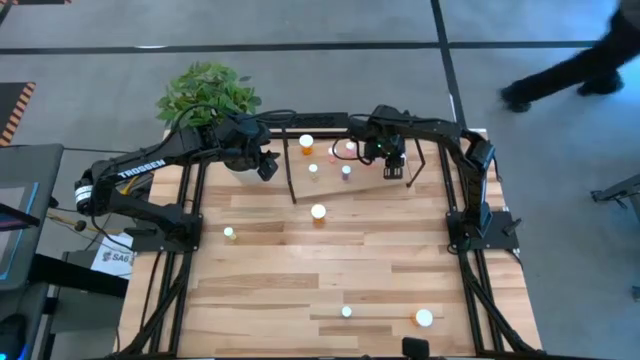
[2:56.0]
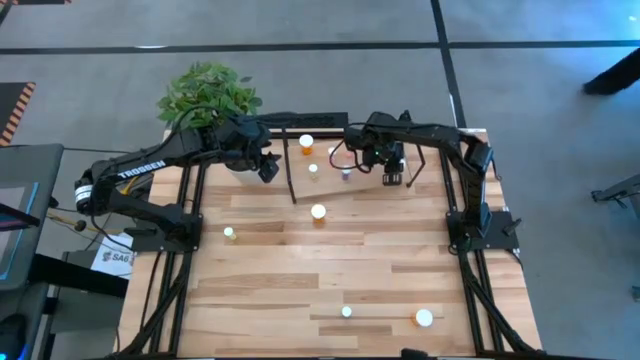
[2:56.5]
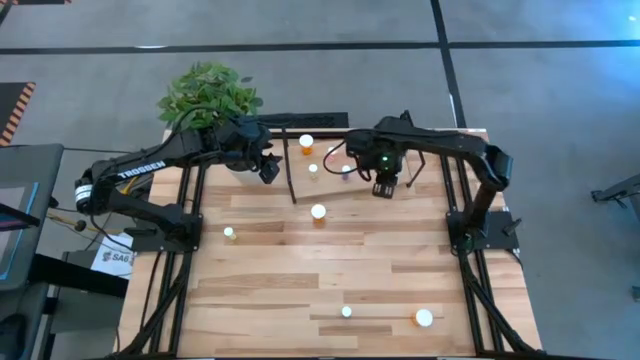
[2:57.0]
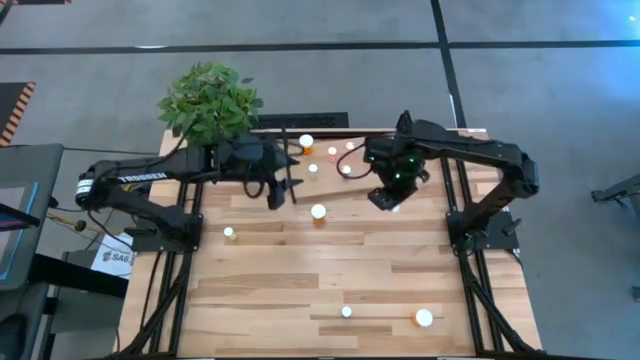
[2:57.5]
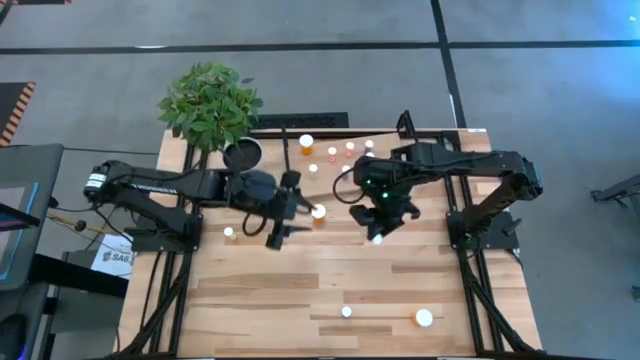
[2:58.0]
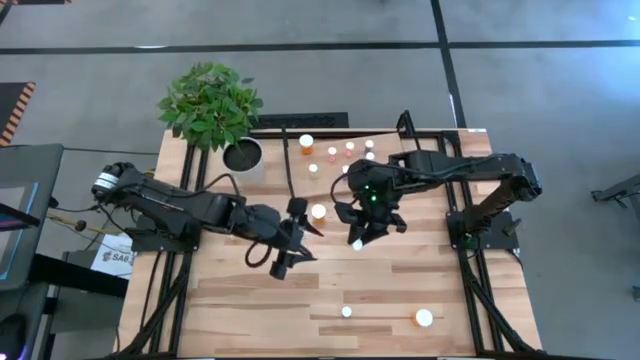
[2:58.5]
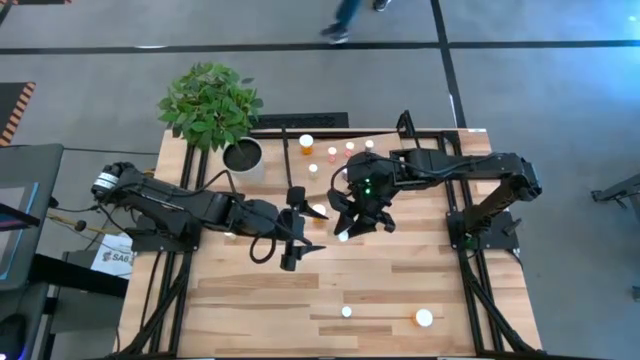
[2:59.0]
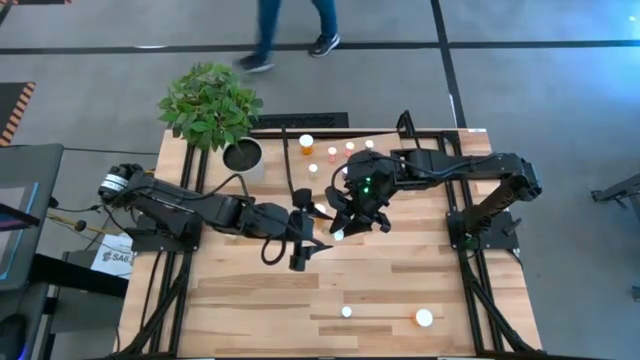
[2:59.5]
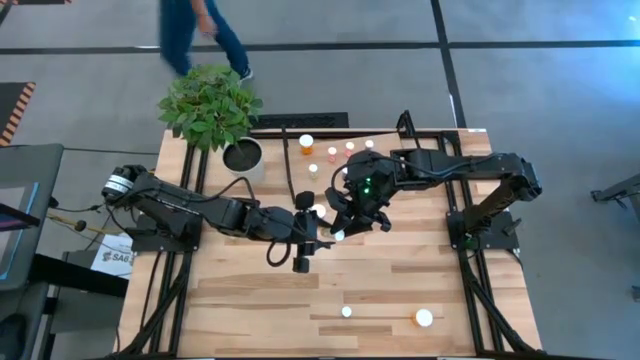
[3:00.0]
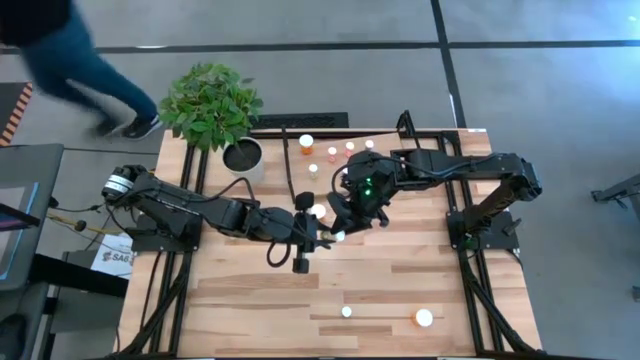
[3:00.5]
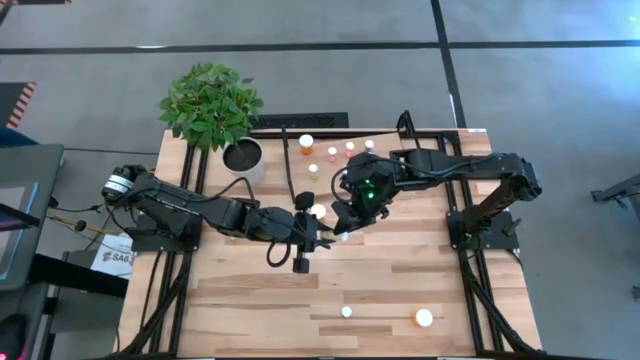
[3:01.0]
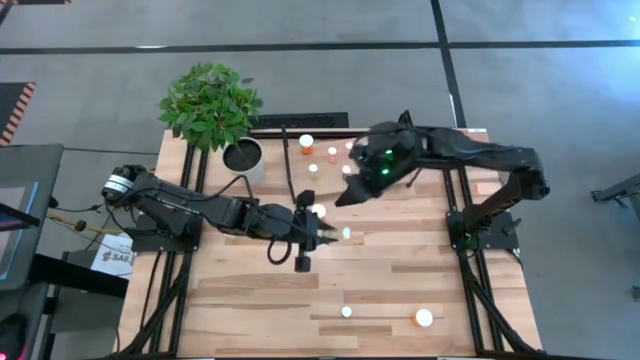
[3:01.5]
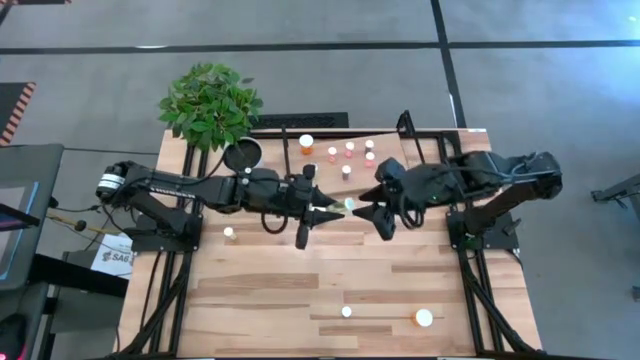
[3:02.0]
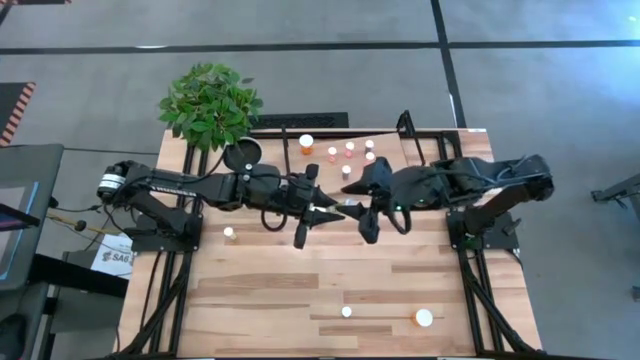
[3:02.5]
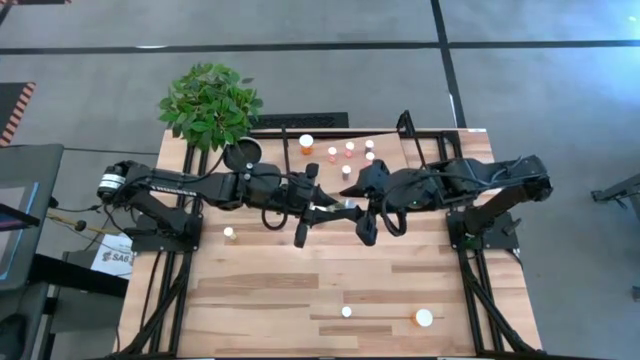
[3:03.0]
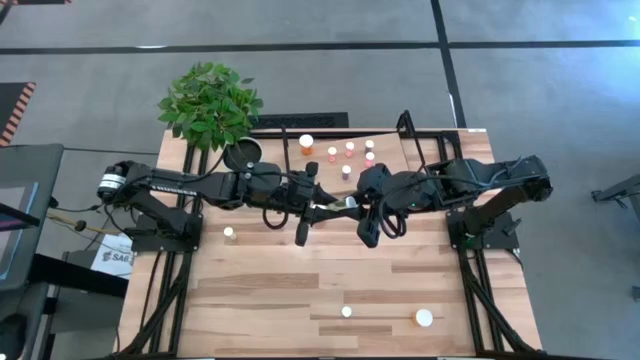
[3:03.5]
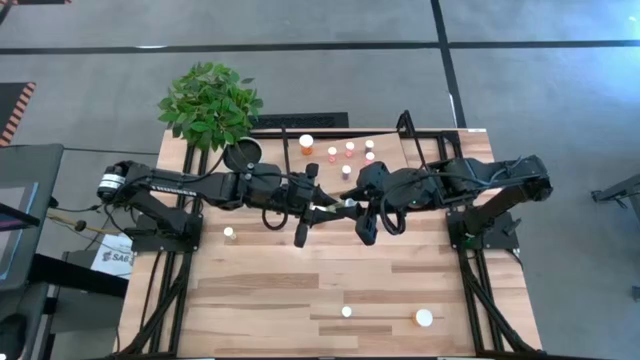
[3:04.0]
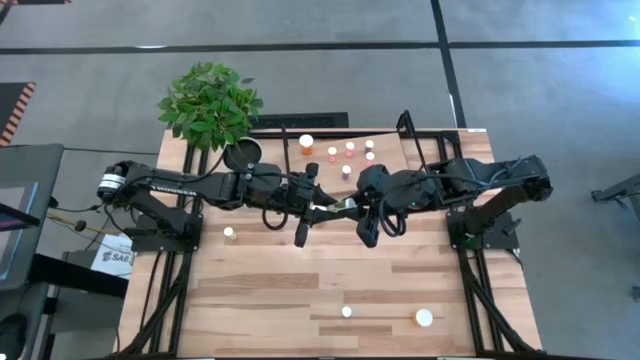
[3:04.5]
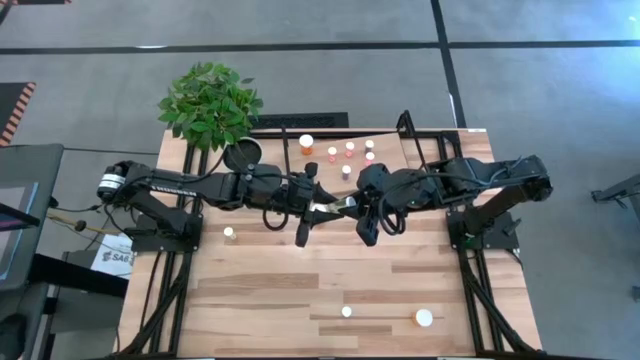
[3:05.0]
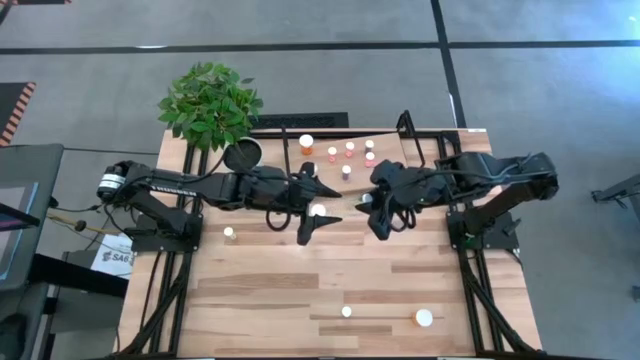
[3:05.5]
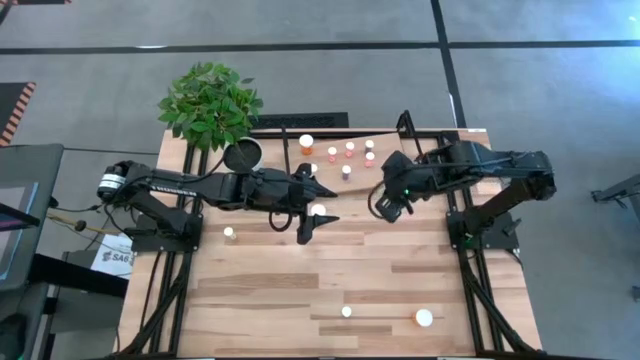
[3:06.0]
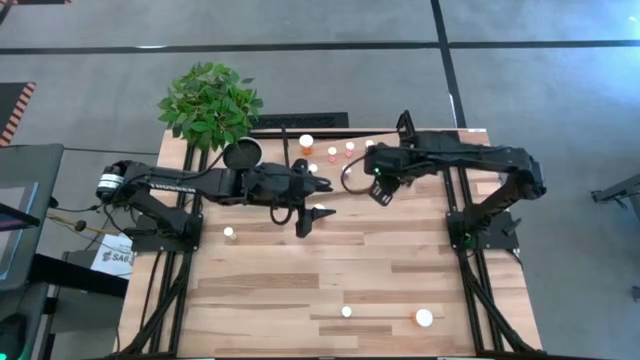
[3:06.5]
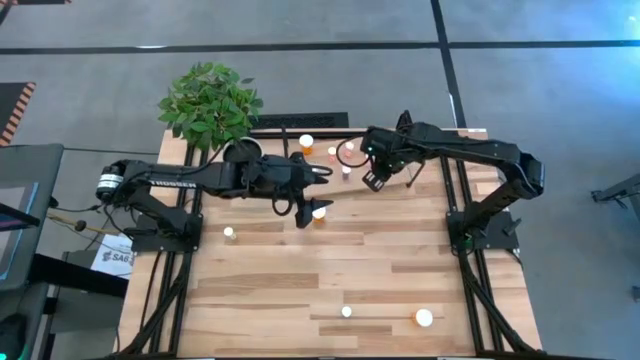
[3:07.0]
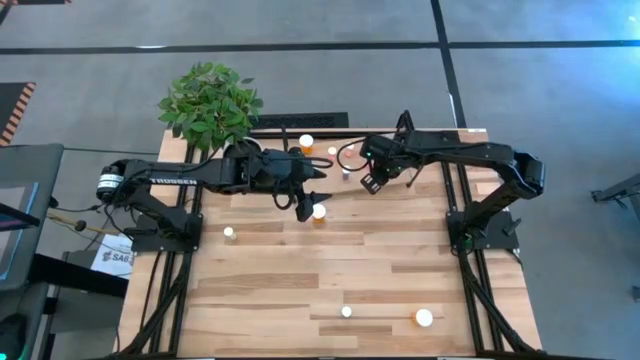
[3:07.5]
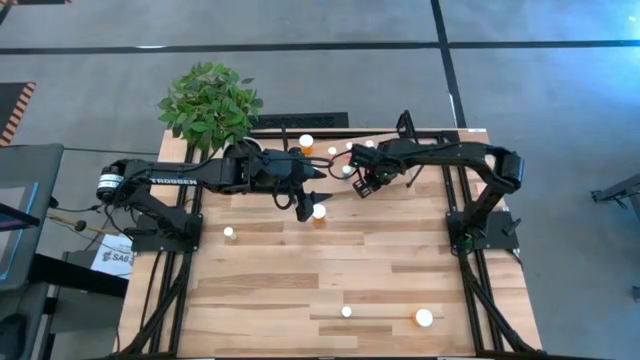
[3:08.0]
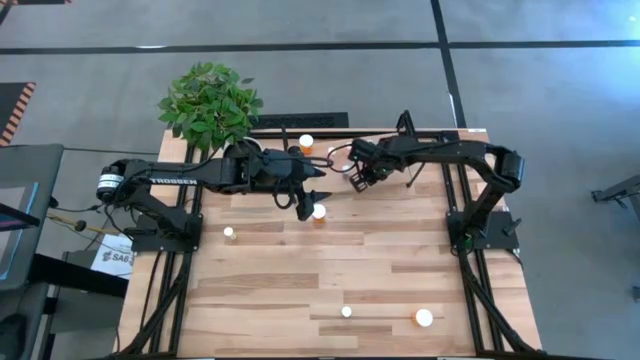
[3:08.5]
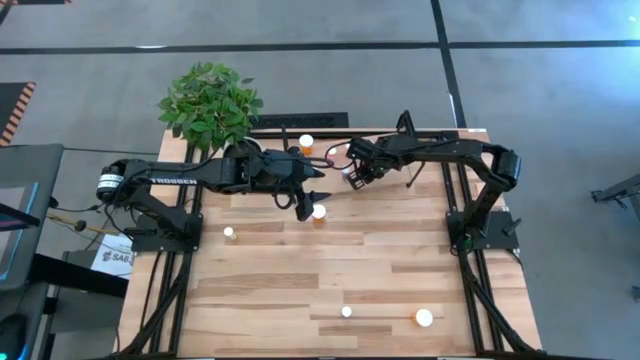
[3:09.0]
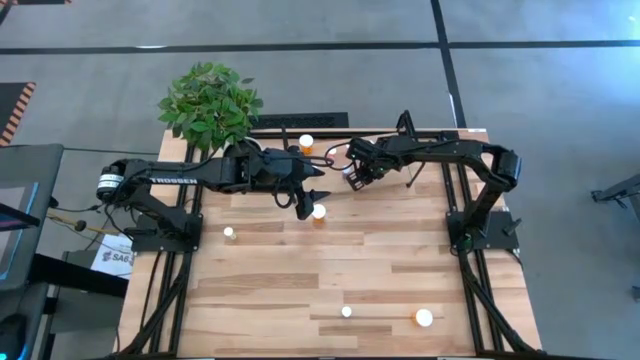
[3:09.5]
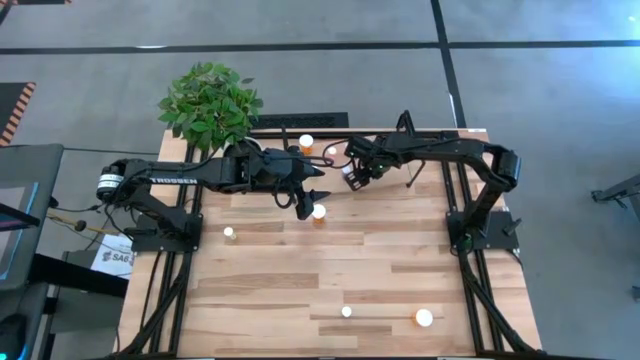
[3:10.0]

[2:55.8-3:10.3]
Task: Pick and place medicine bottles onto shelf by color
Put the bottom yellow pill bottle on the shelf

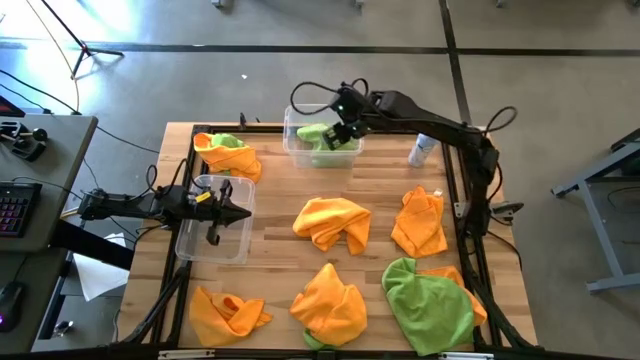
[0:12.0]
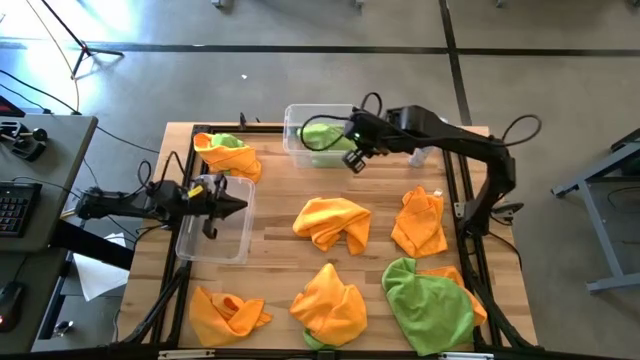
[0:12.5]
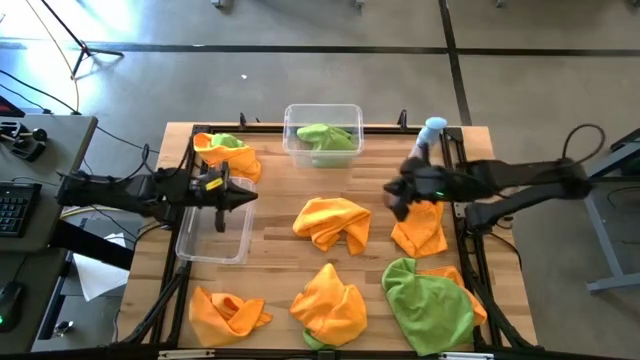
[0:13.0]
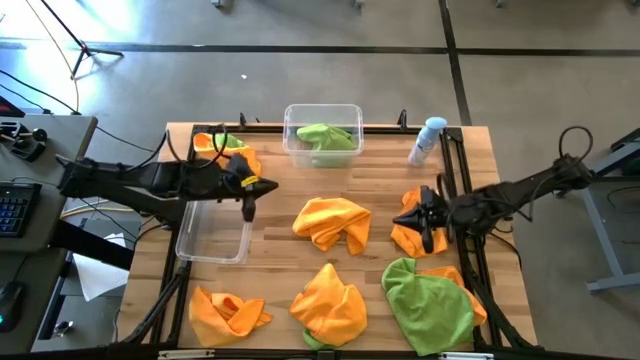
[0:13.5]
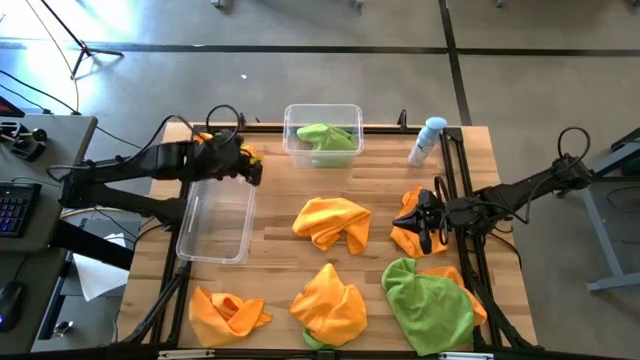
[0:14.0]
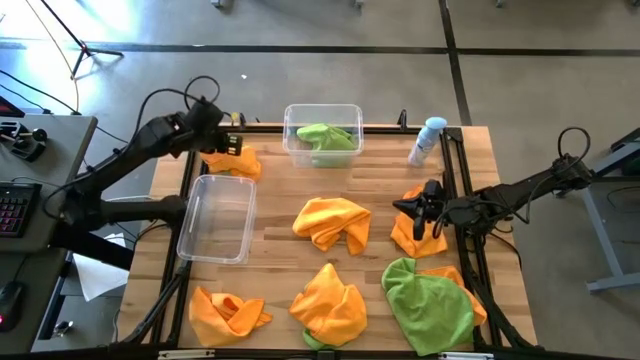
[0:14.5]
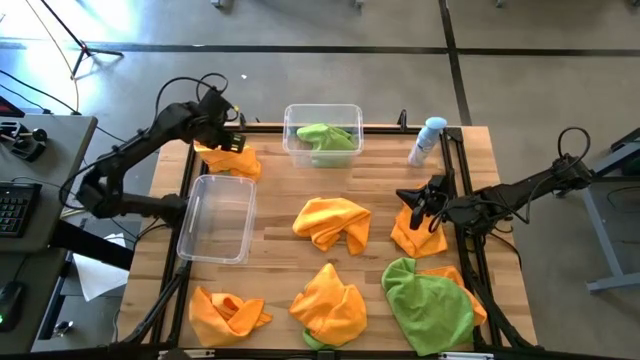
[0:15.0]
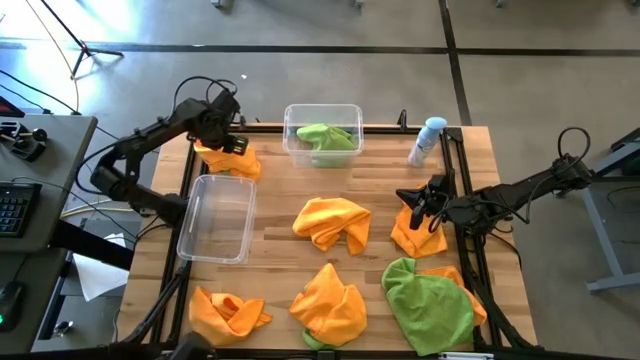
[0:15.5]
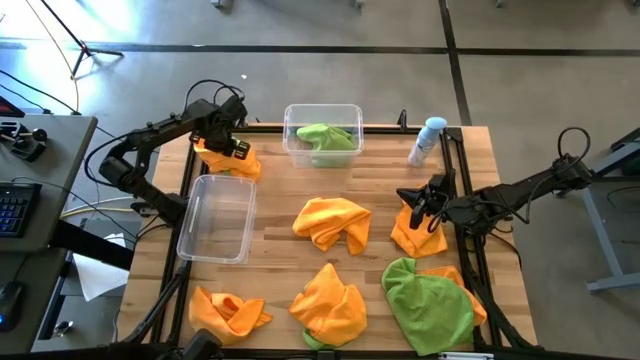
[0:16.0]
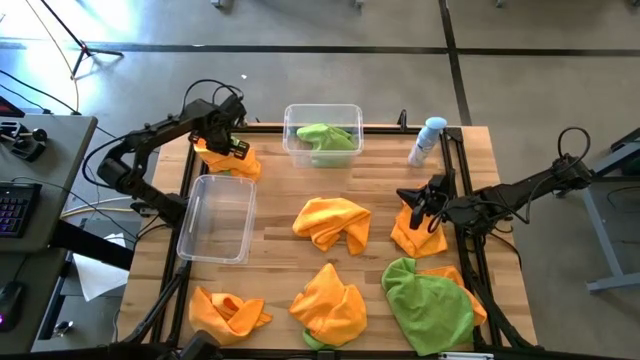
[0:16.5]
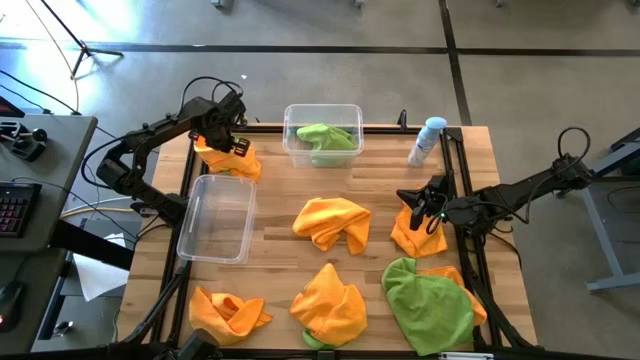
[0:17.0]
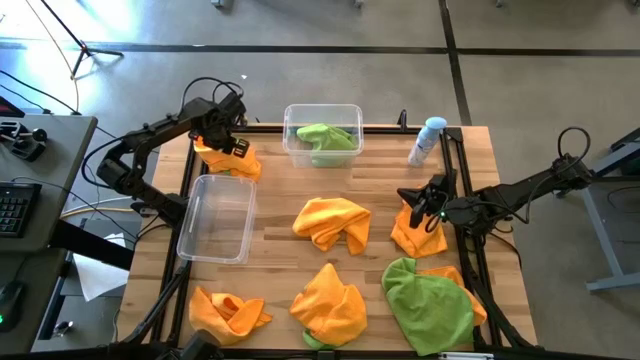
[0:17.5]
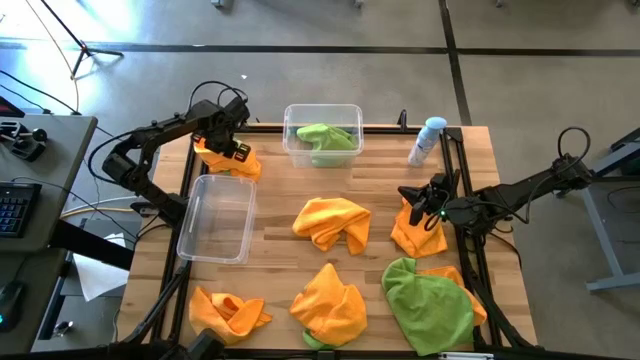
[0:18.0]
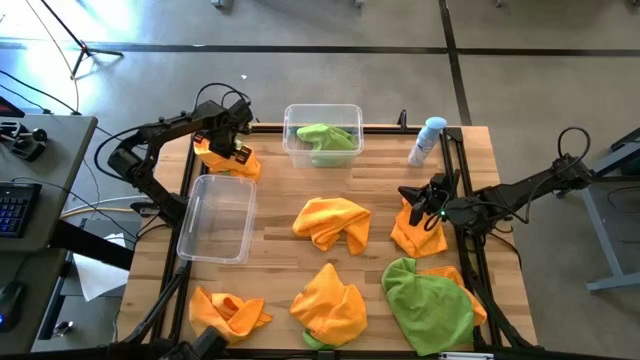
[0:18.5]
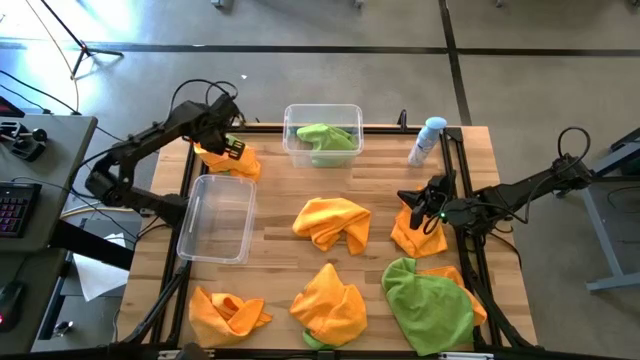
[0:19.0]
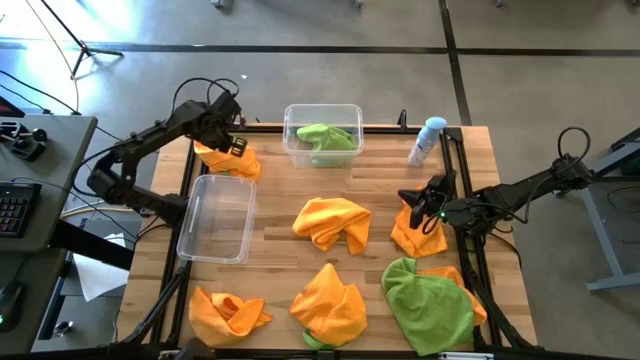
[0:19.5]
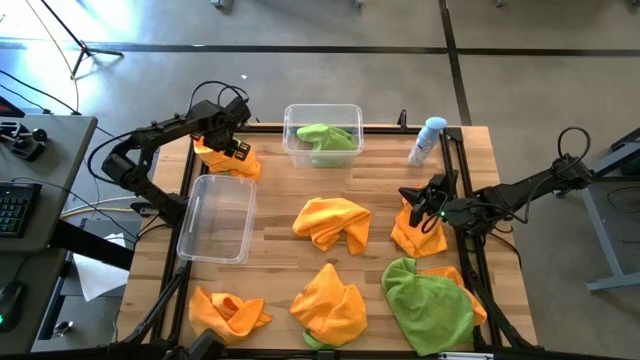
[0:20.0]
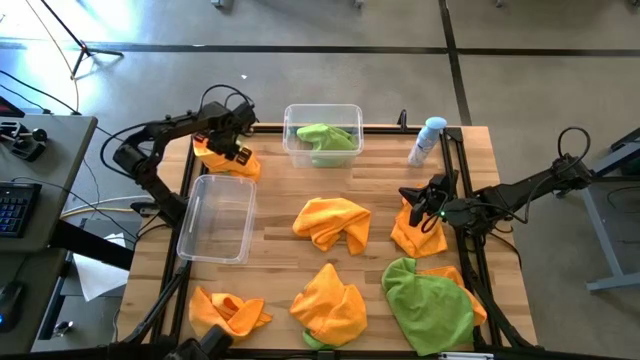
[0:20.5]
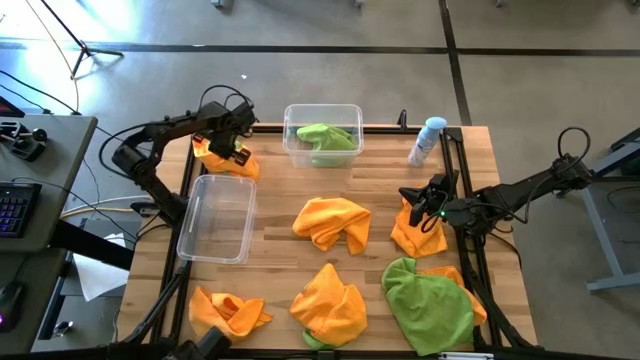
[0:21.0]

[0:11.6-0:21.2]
Task: Sort microfiber towel by color & place in baskets
Put the orange microfiber towel into the bottom transparent bin
